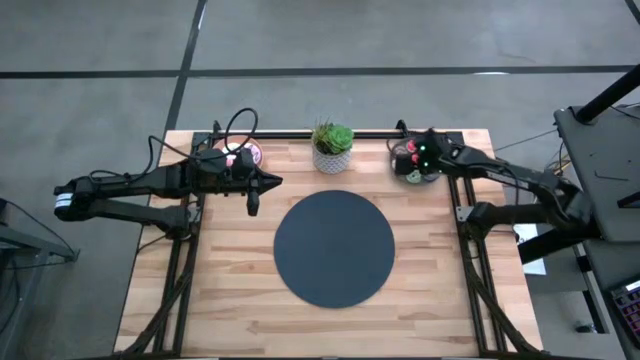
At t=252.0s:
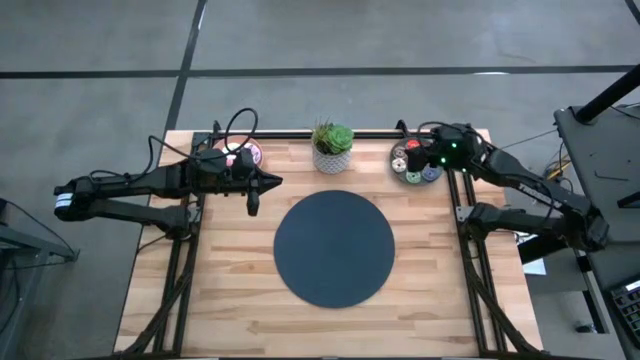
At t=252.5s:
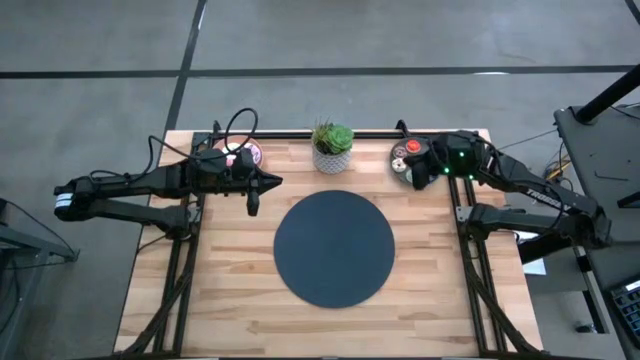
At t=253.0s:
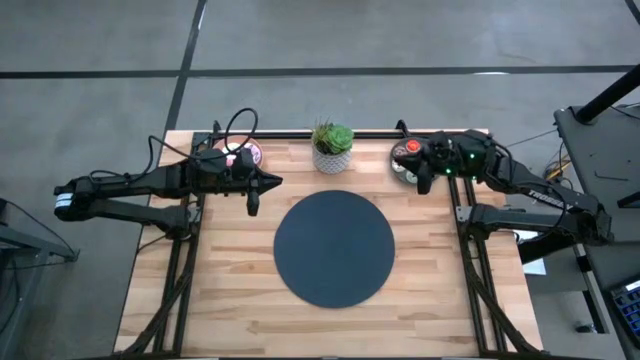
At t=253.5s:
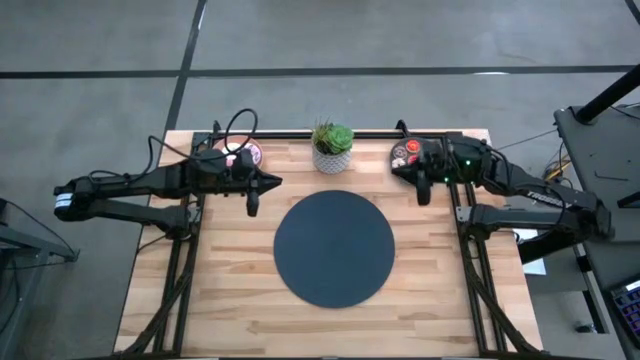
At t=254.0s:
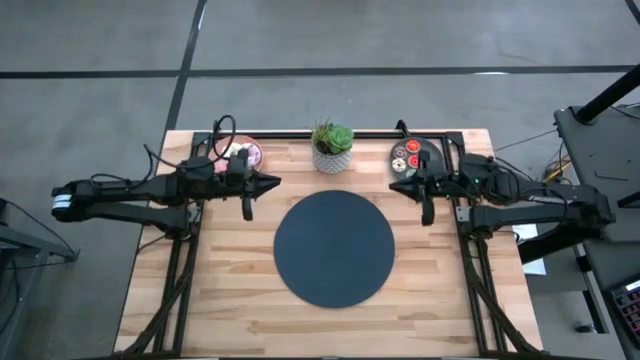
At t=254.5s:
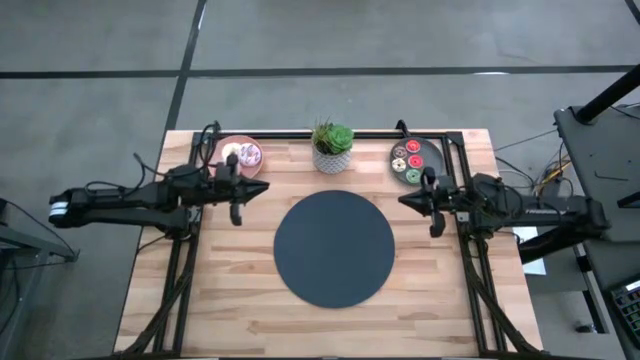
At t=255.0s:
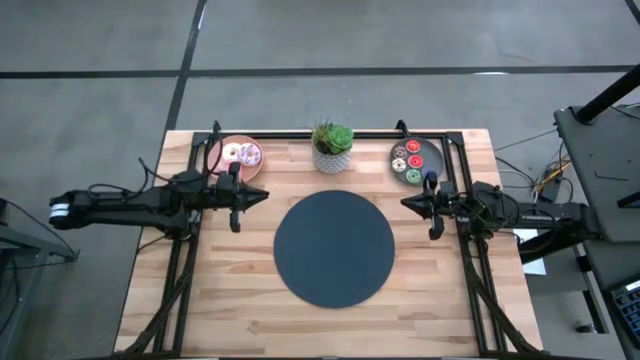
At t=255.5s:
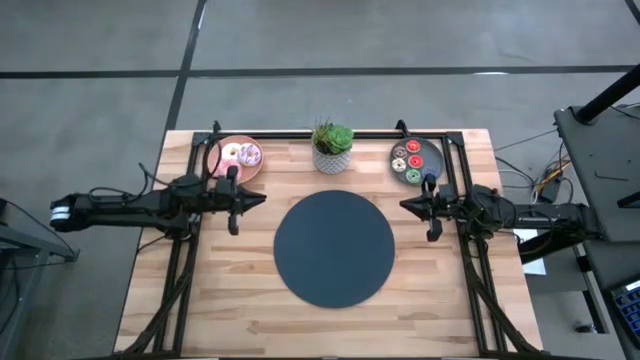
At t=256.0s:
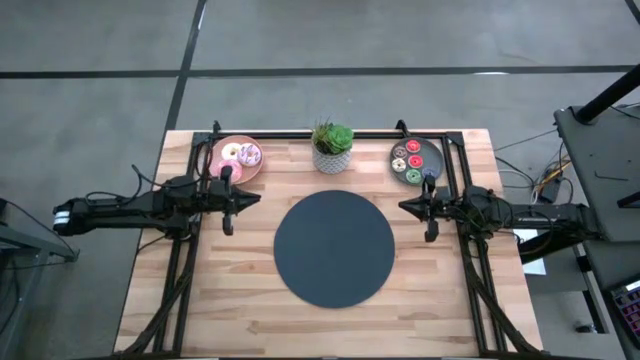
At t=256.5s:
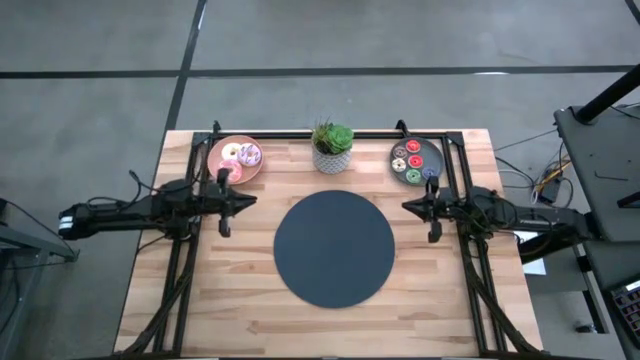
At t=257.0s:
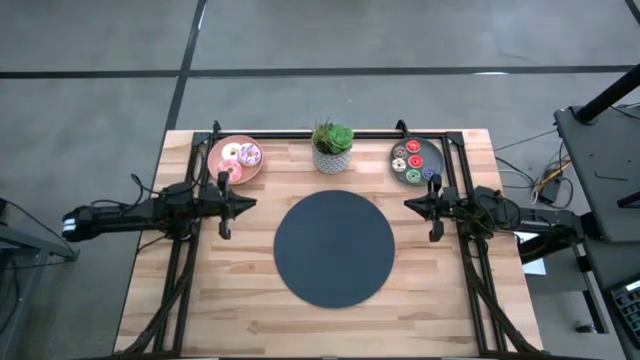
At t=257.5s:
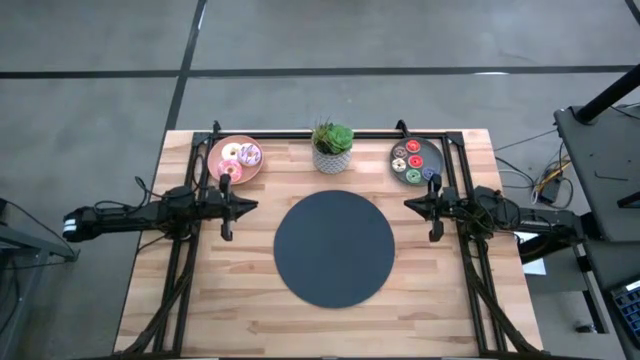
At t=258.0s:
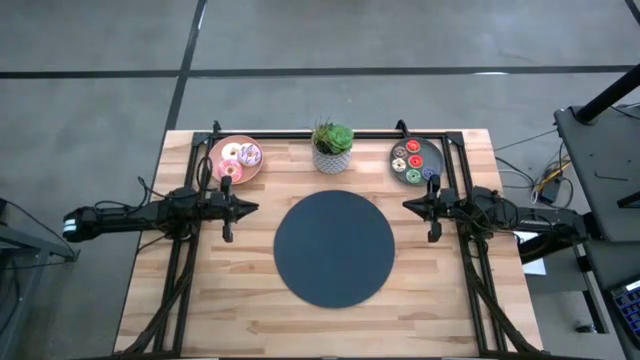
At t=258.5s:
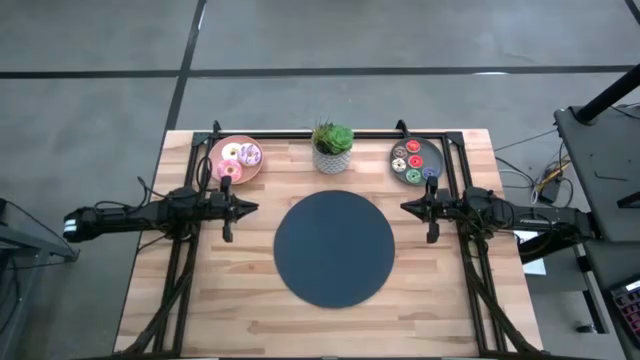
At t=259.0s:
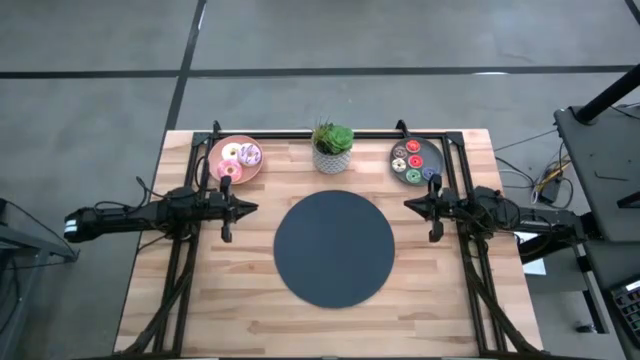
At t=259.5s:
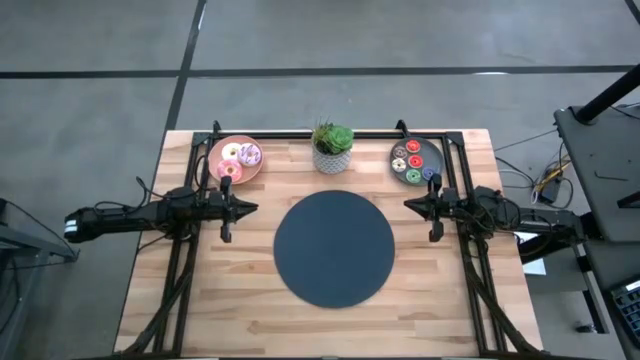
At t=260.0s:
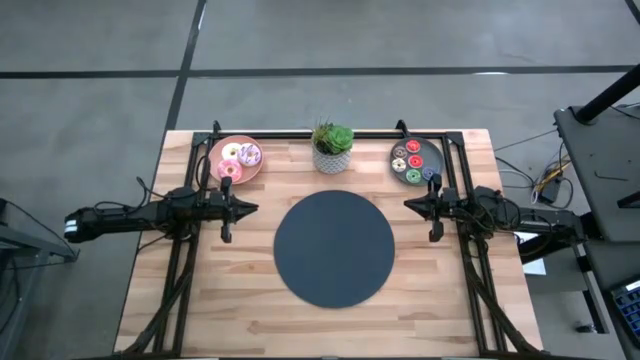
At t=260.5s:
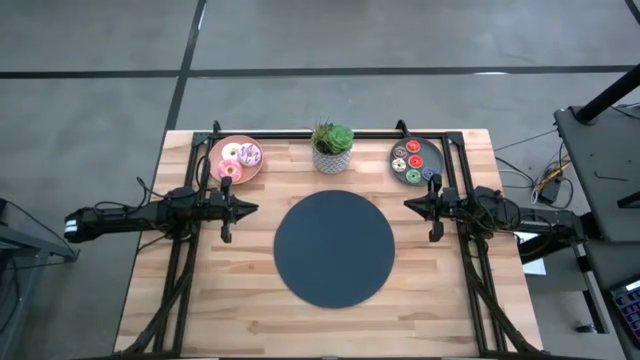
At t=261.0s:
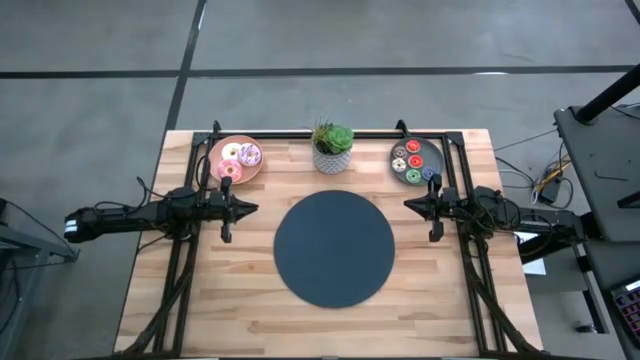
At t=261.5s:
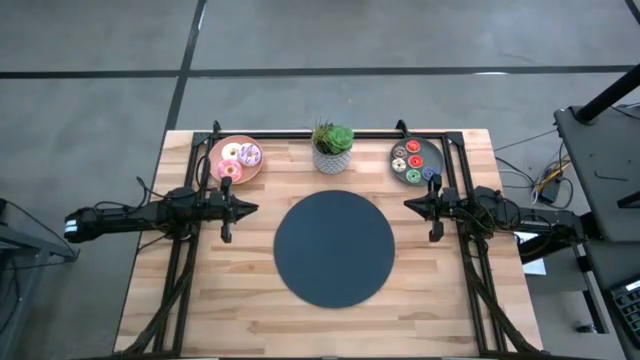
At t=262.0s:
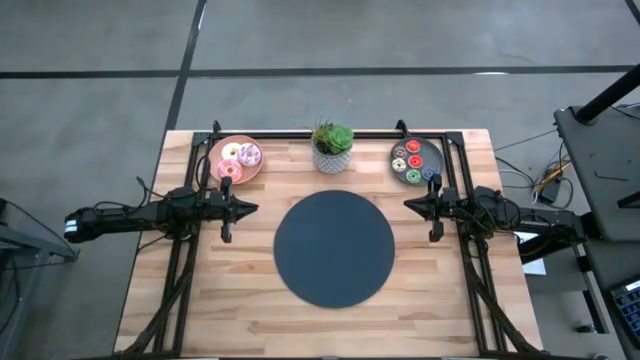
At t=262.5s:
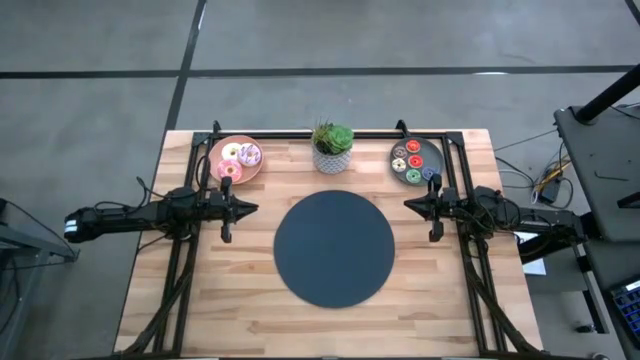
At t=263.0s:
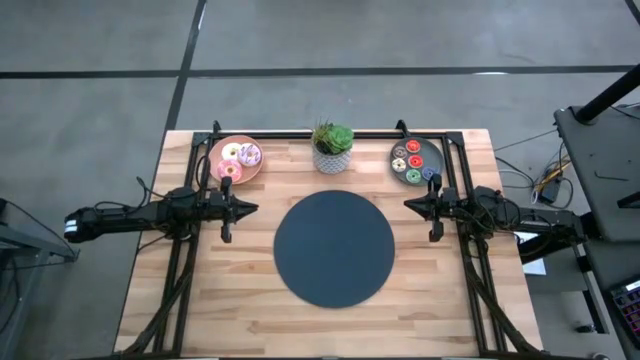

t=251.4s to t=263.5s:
Task: Pick & Place donuts
Return to Home Position

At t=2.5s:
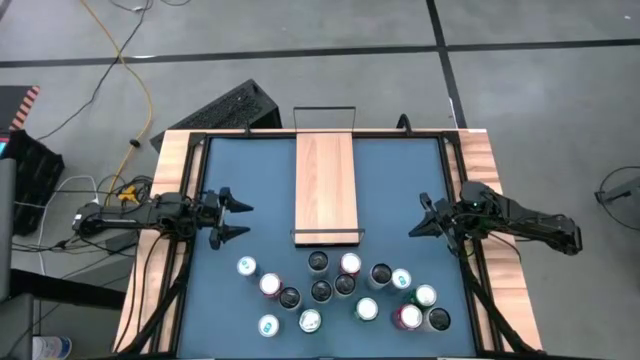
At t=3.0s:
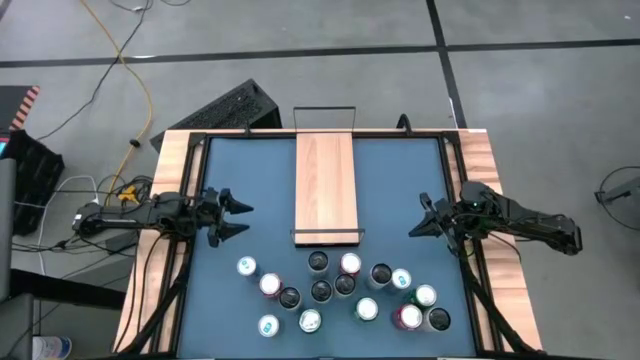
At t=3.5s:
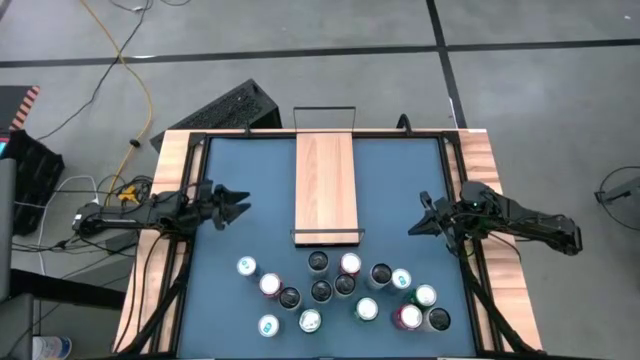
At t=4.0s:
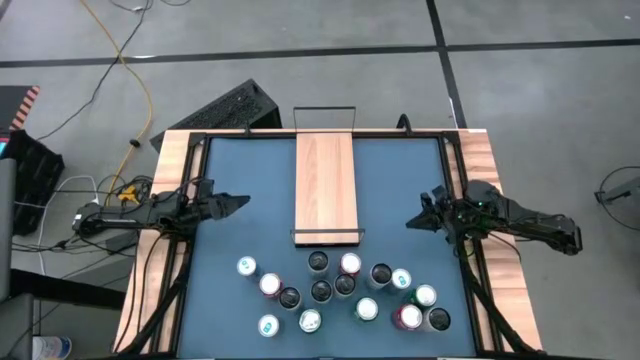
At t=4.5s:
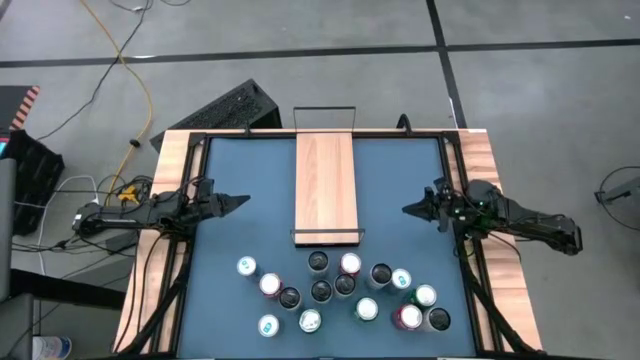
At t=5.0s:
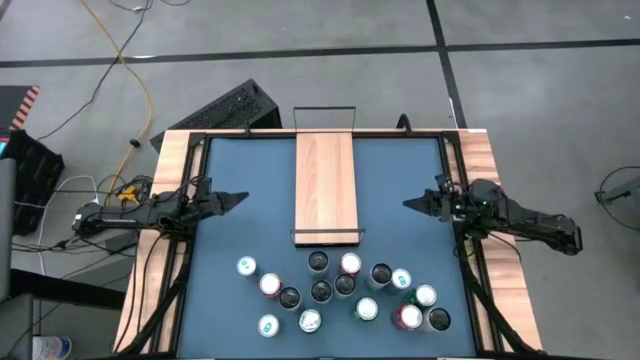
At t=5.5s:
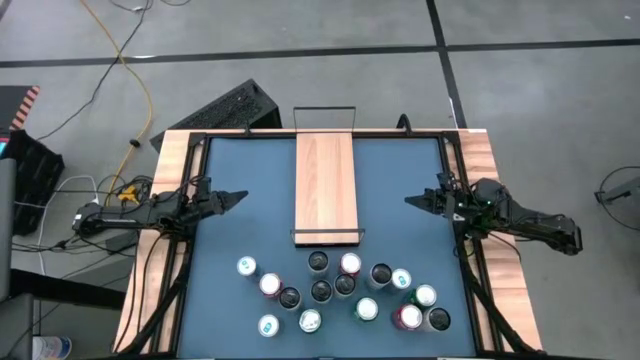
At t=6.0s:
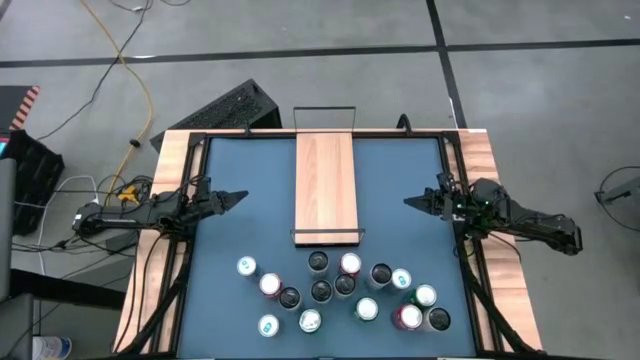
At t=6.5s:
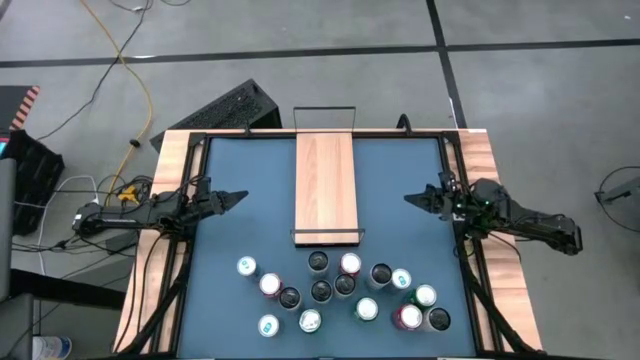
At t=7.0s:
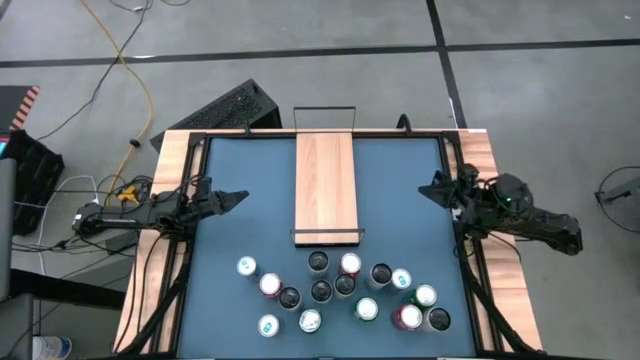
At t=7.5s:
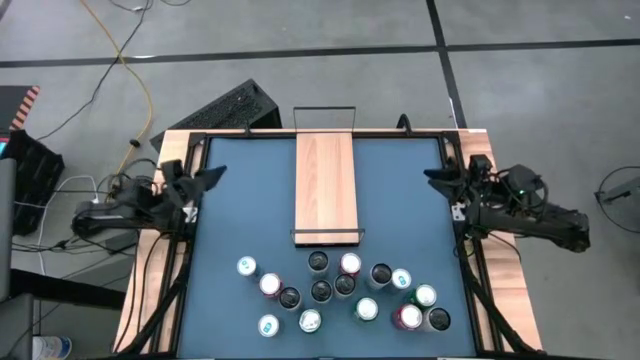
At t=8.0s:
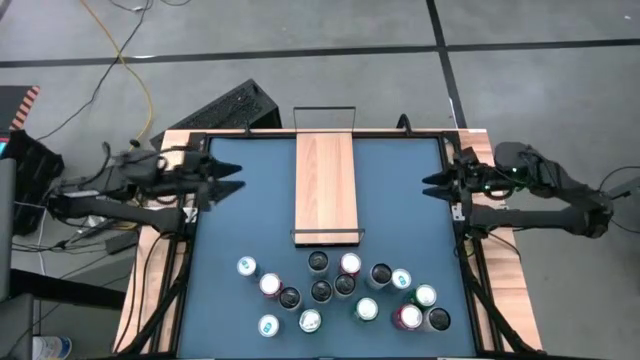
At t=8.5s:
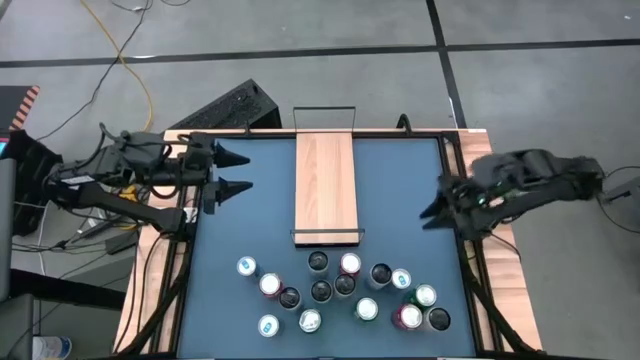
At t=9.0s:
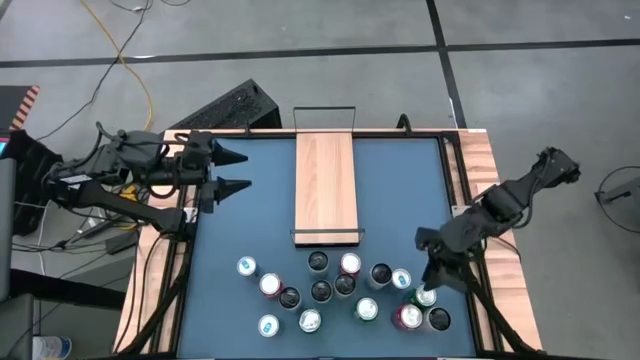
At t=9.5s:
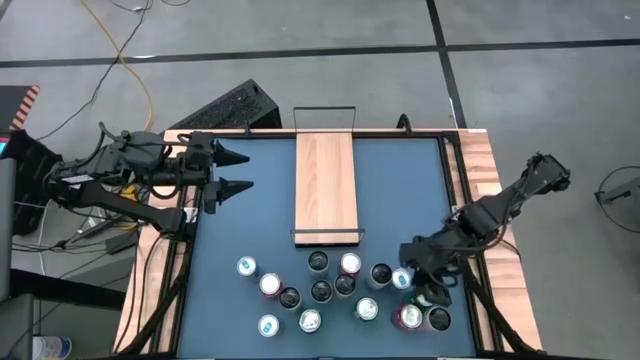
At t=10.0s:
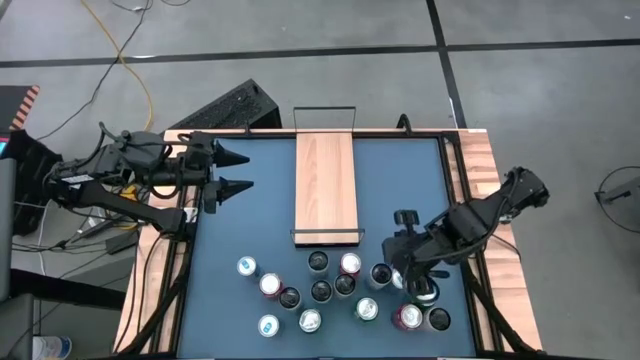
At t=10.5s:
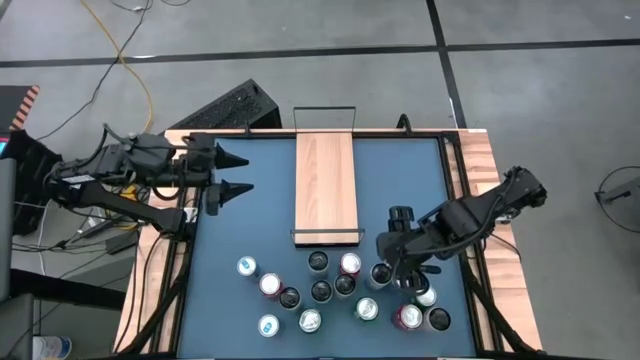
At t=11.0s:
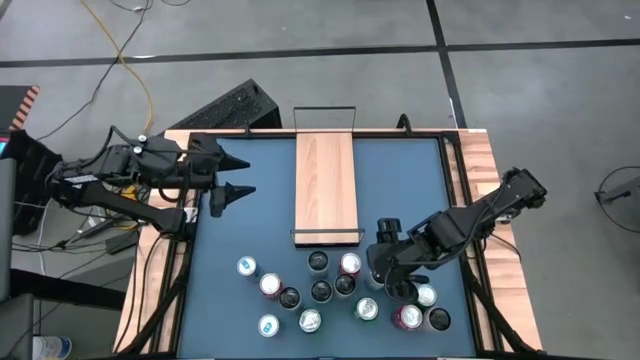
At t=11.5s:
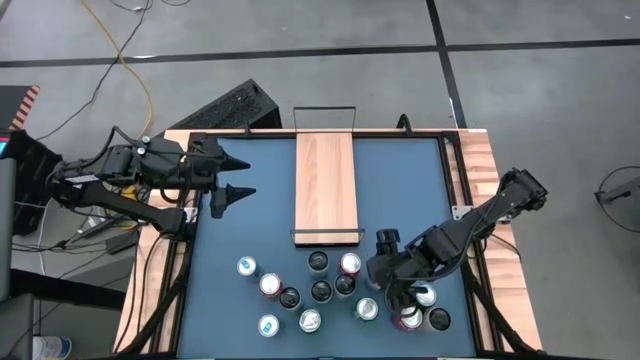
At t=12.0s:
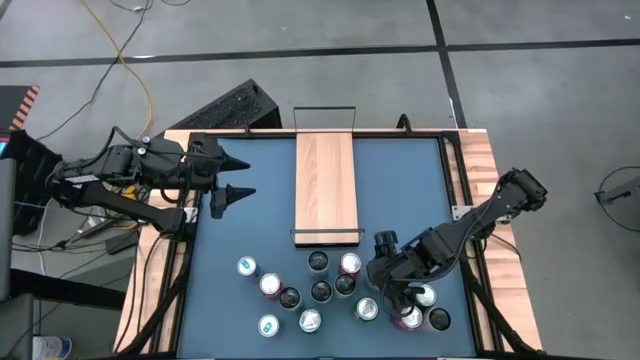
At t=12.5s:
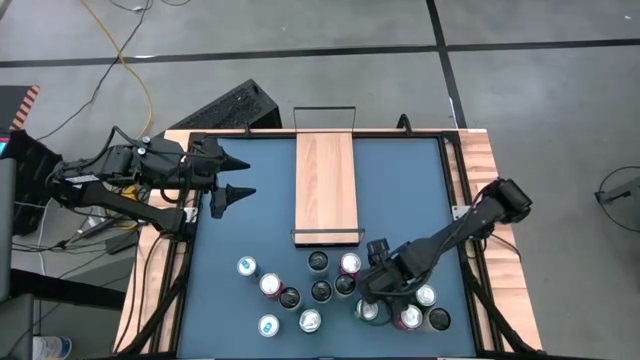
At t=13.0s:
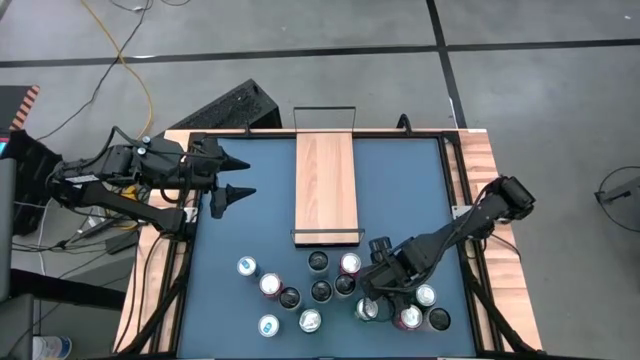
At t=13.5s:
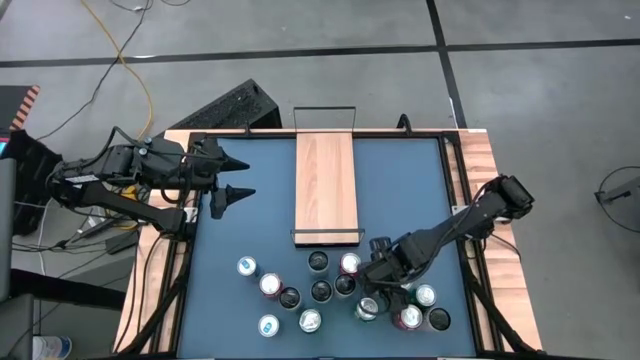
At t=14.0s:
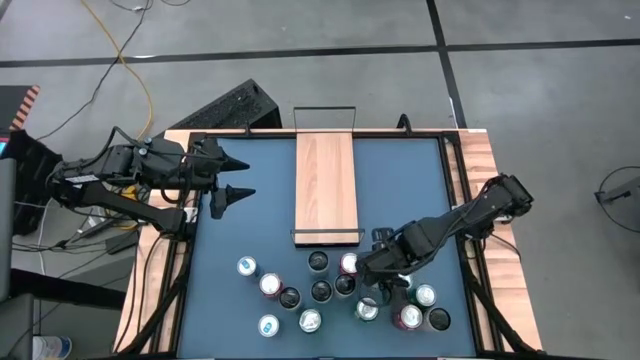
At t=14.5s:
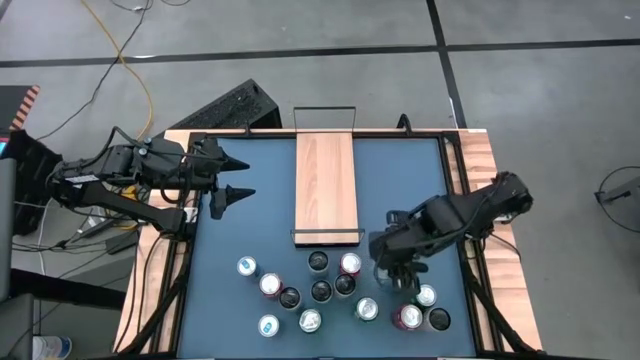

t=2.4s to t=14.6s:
Task: Place canned beverage on shelf
Put the bottom right white blue soda can on the shelf
